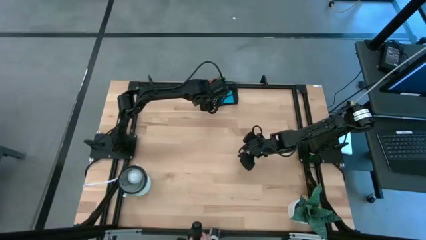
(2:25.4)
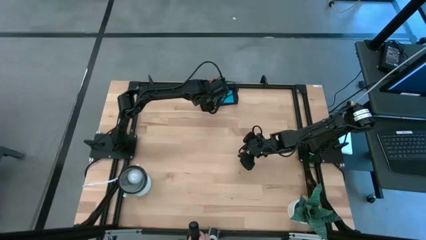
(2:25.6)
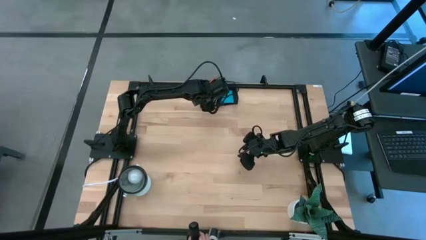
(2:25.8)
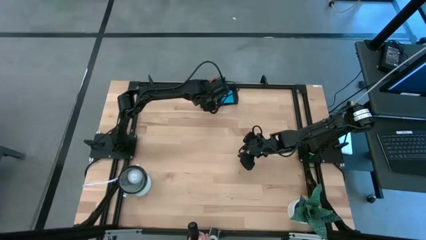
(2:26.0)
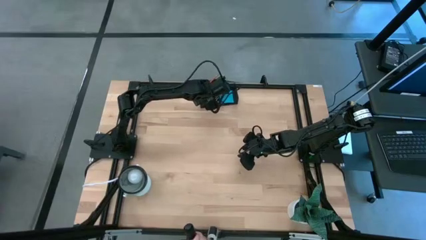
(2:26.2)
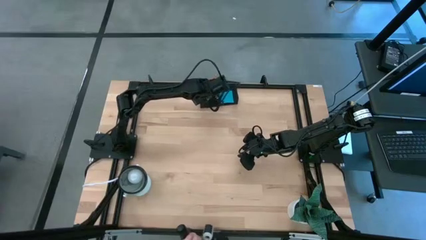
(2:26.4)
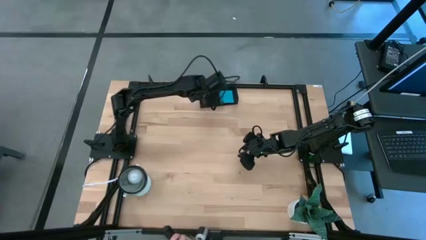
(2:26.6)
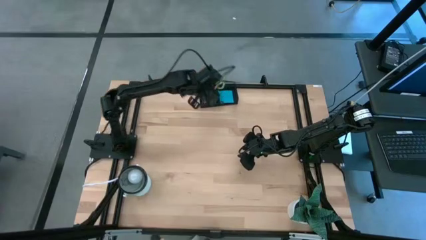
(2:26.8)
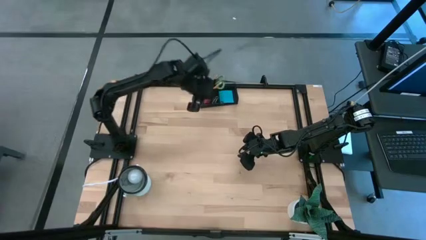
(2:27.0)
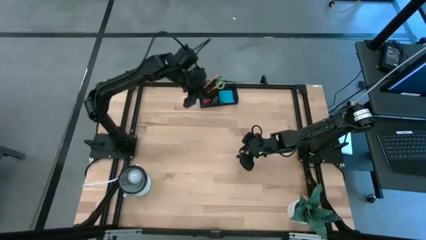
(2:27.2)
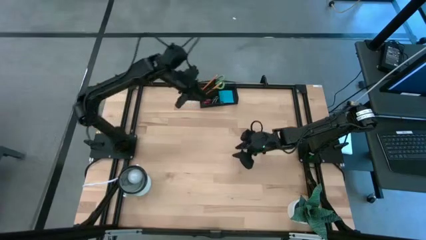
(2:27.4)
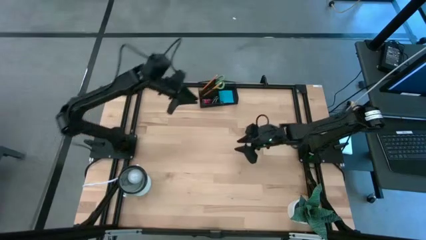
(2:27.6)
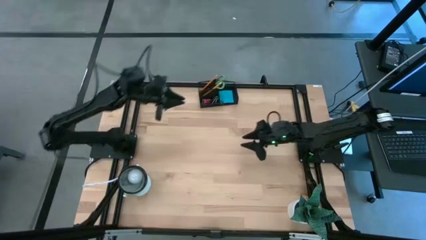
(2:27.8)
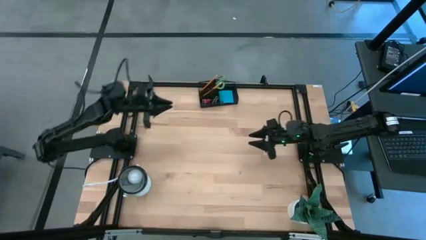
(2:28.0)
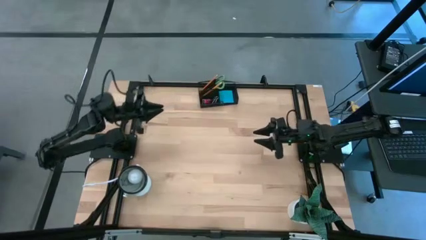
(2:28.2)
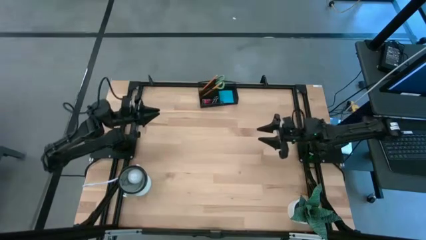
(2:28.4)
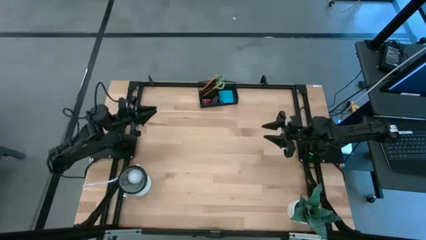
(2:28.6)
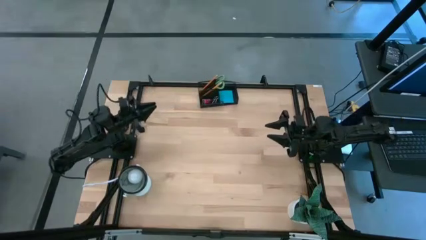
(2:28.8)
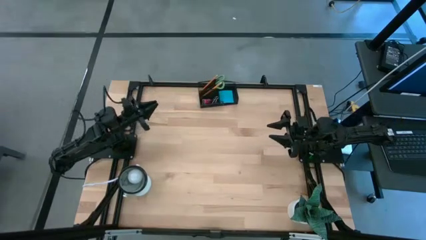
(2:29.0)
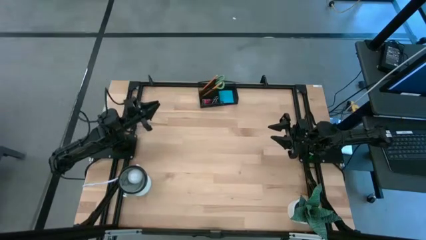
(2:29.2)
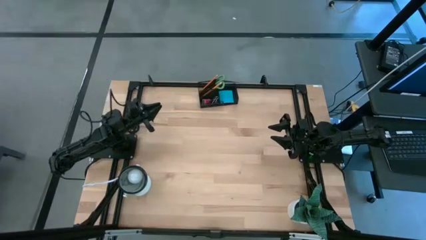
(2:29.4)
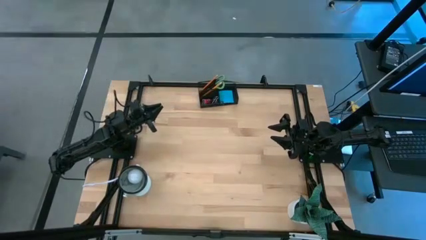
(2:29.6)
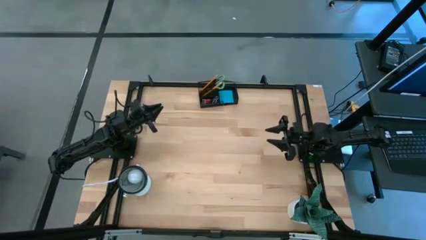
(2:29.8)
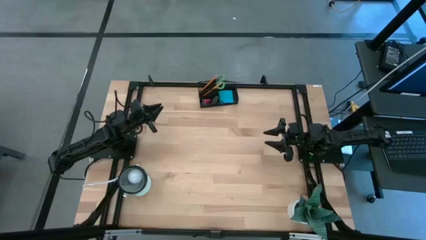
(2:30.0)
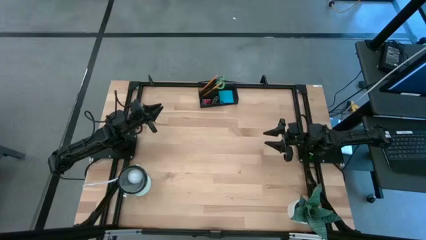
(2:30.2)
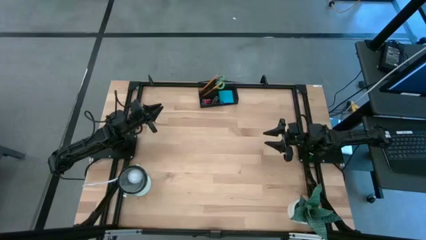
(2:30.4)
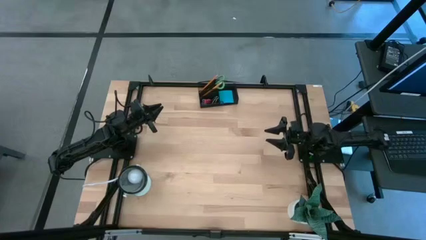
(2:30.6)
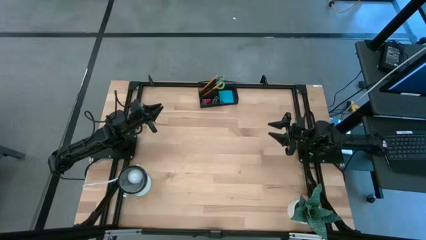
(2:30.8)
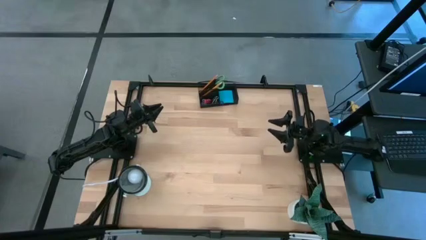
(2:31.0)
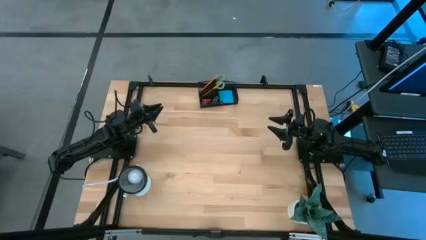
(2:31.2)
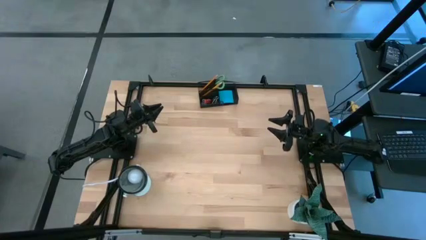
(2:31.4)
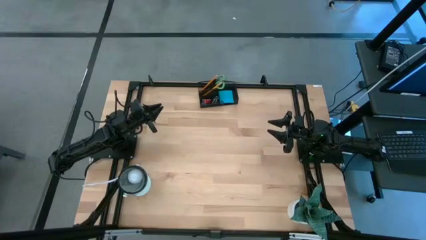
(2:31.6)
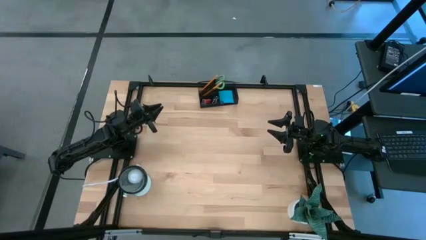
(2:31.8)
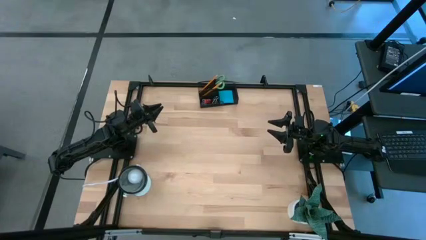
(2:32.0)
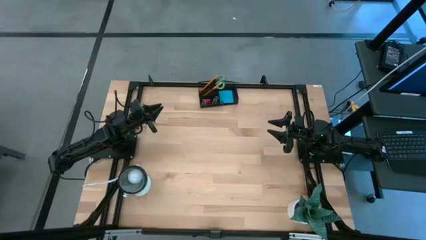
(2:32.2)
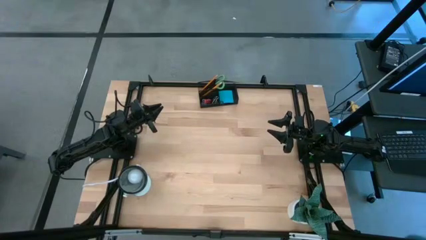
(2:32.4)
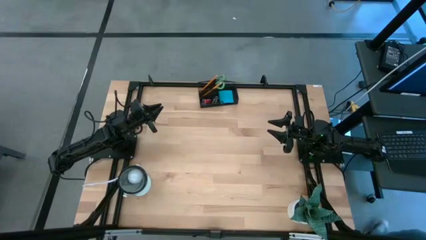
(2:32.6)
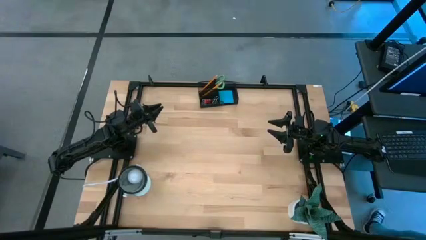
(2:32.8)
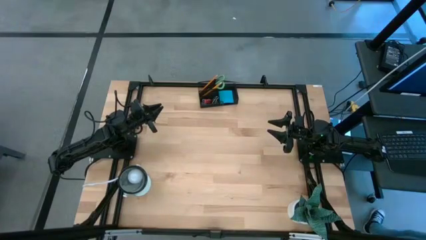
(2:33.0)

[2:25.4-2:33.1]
Task: Pick and place office supplies into organizer
Return to Home Position

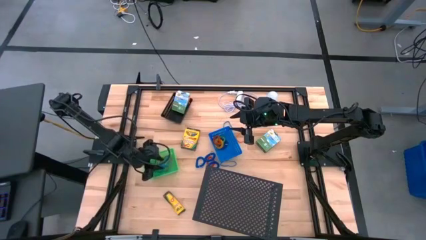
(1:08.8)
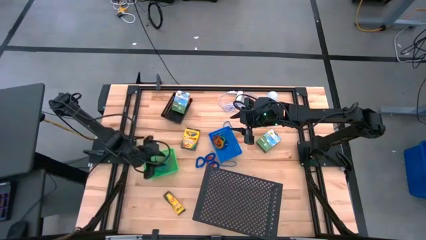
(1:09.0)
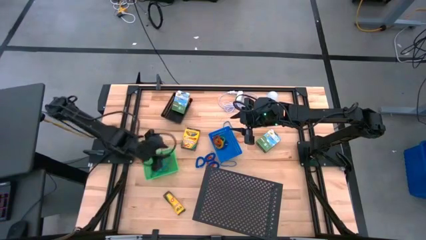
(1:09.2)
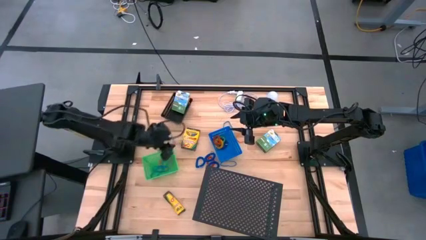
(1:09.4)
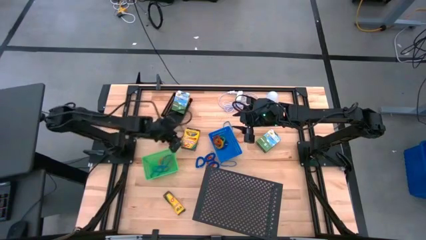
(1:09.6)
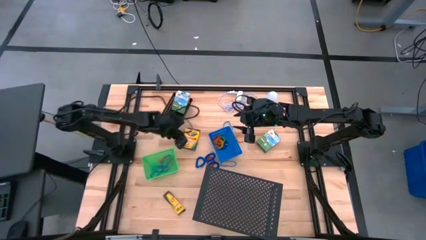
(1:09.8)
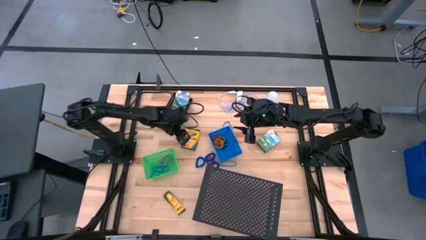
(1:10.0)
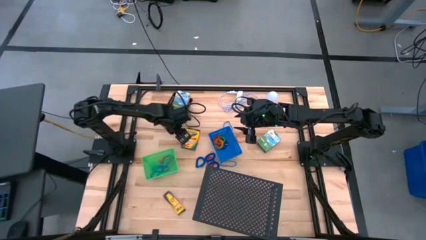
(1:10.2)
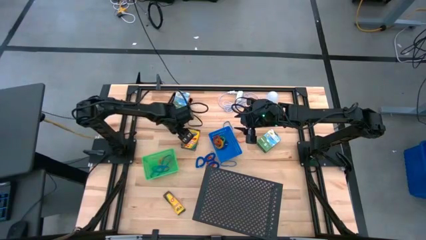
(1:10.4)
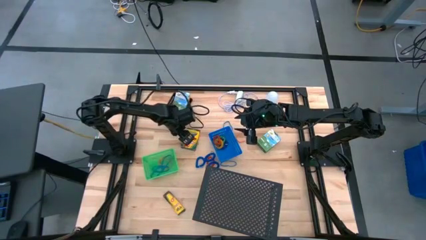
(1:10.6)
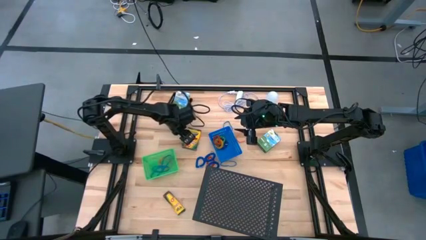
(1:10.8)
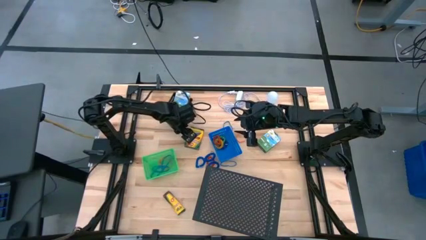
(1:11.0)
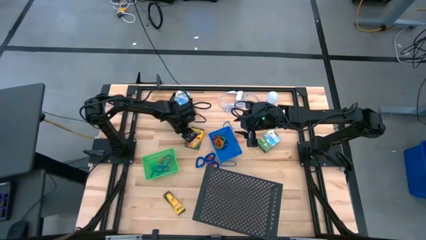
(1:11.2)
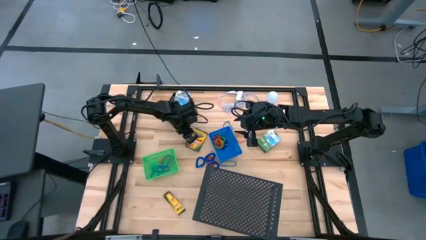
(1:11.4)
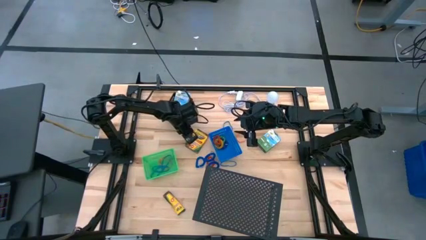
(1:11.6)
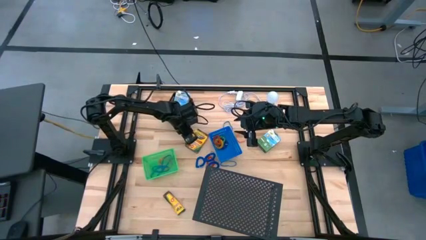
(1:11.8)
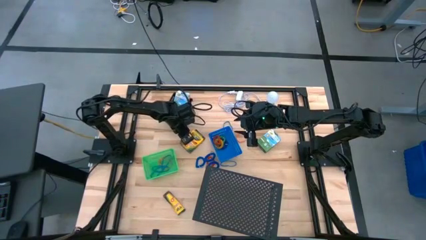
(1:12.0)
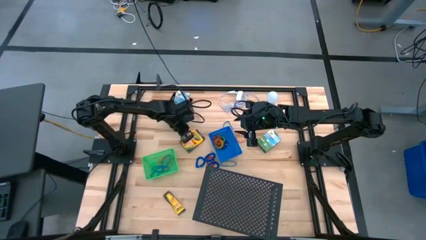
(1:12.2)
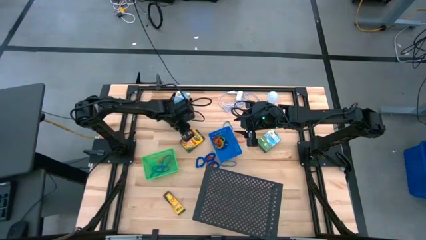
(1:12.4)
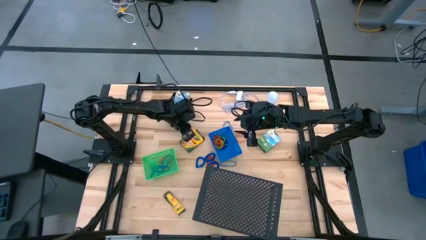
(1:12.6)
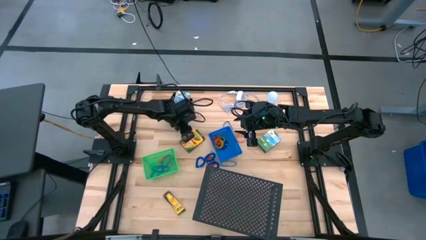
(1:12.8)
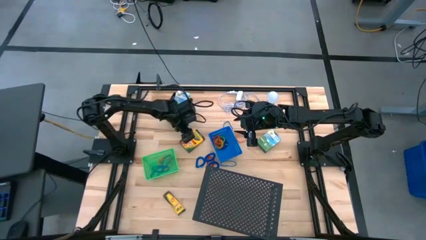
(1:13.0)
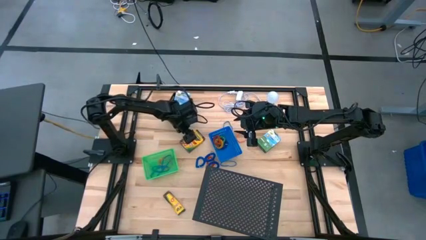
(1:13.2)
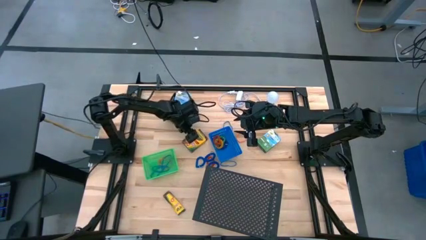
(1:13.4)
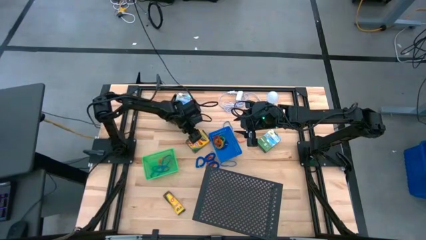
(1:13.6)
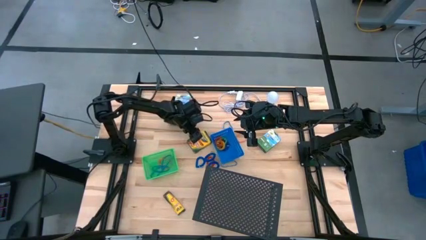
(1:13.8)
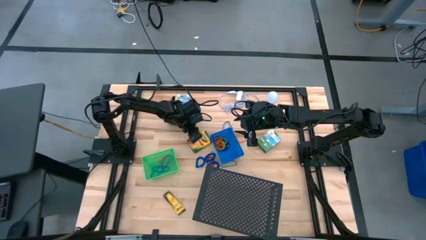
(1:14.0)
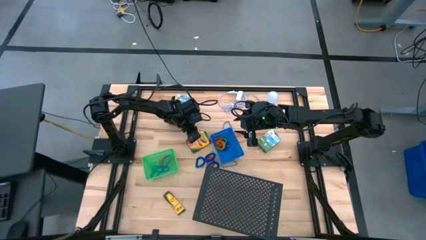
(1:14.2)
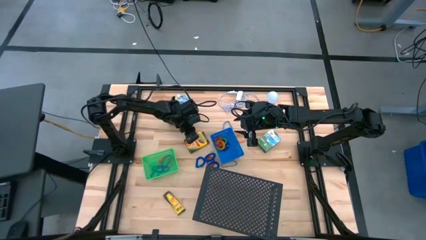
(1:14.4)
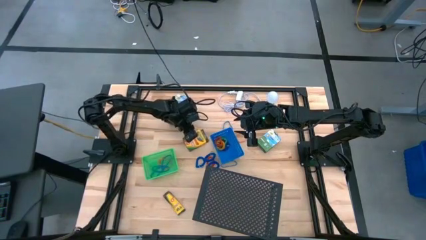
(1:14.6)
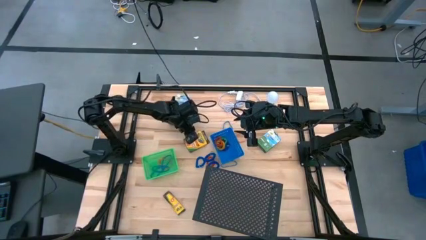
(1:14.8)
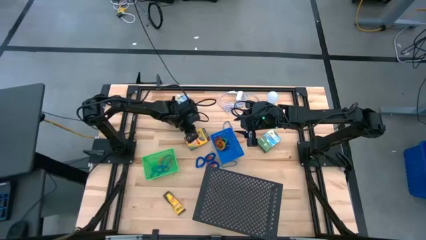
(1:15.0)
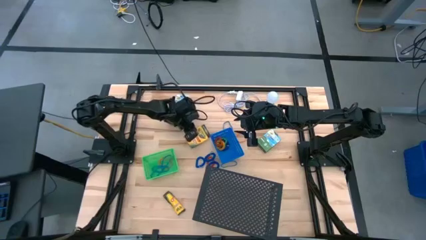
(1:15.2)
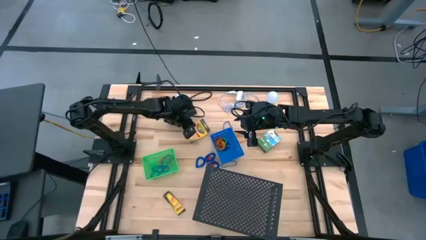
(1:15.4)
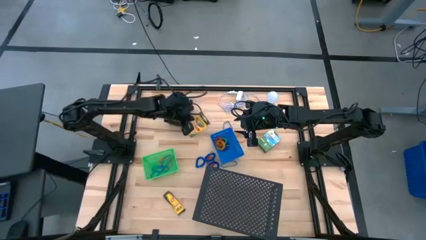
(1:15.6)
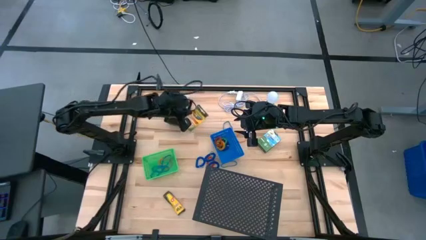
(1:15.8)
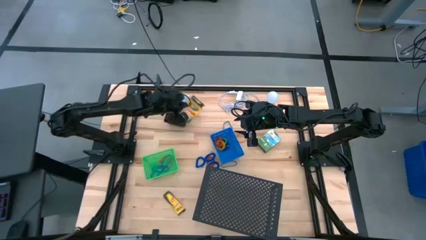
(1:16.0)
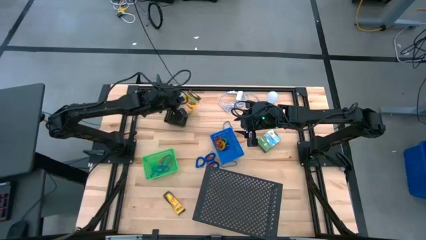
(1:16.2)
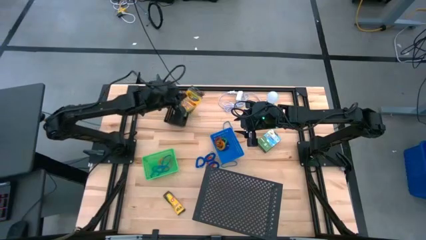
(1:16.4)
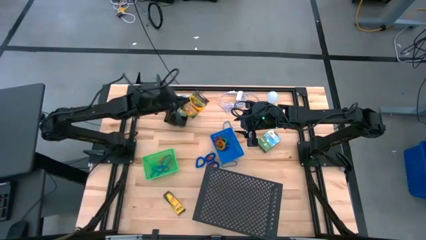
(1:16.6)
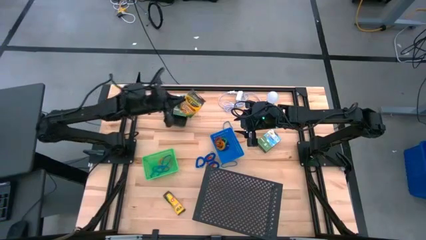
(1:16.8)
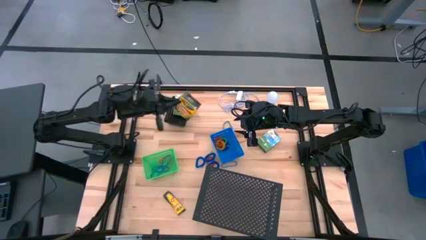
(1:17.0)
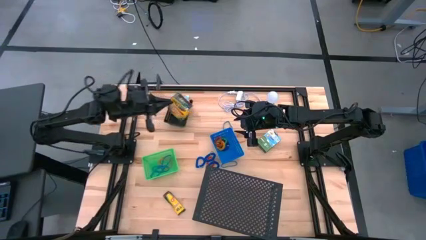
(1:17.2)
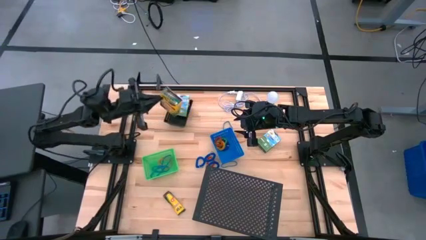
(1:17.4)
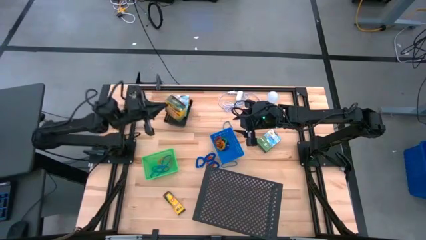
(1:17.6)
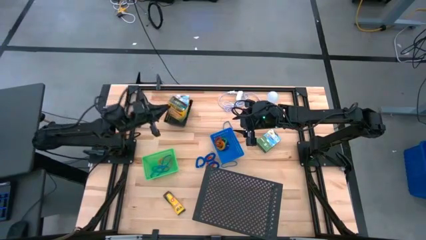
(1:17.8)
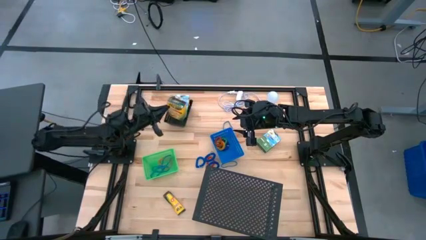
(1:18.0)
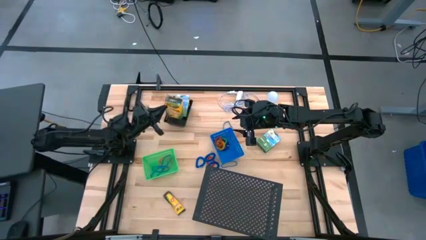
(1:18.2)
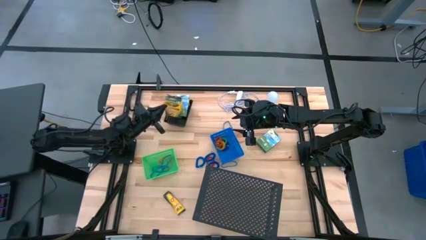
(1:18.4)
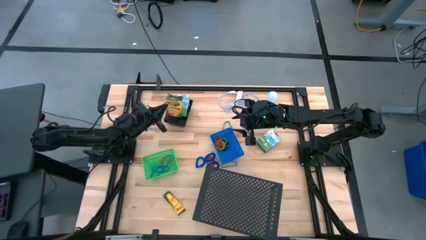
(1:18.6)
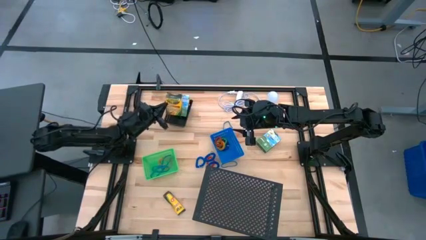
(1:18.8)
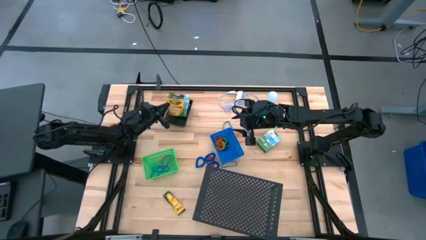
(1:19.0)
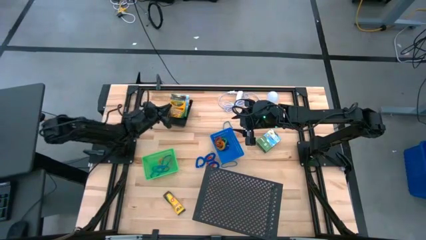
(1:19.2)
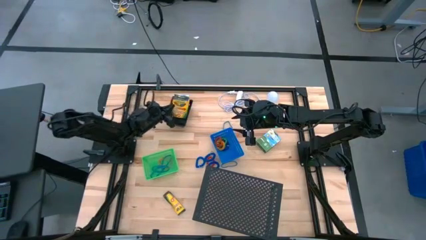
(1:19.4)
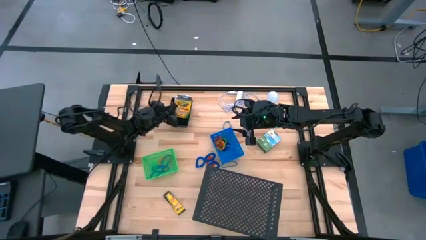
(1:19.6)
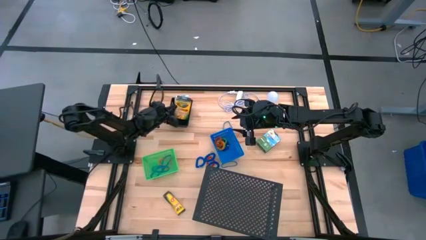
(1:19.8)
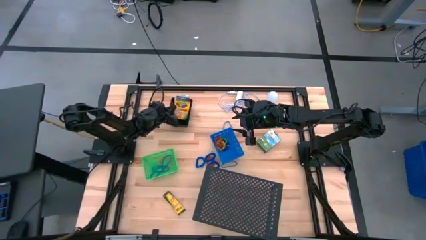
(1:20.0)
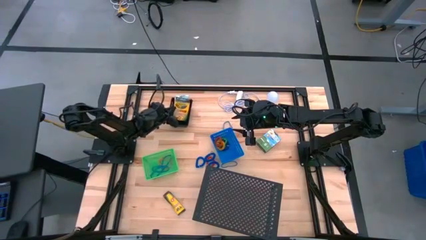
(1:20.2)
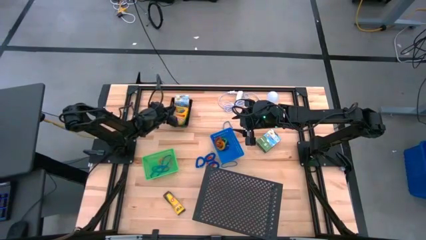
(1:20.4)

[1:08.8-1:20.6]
Task: Pick & Place Office Desk Supplies
Put the yellow crayon box into the black bin
